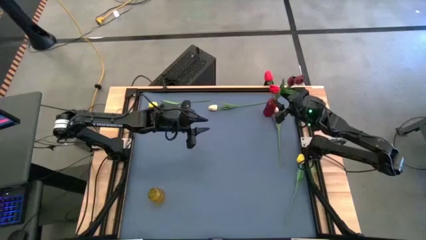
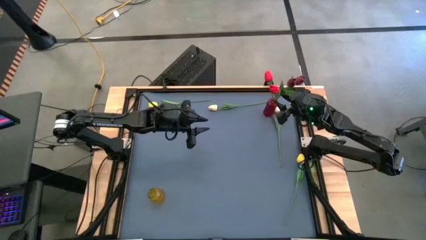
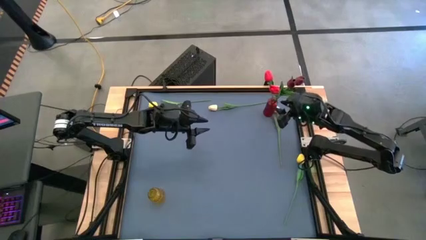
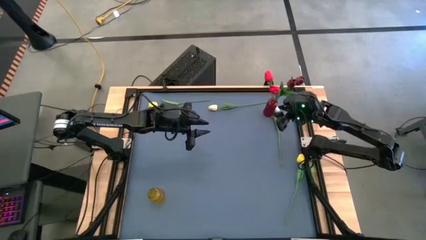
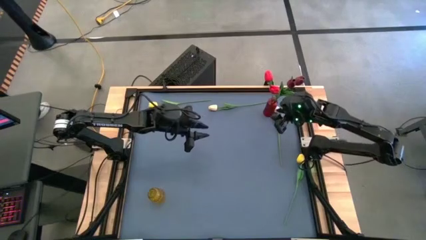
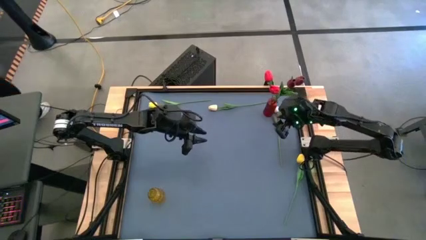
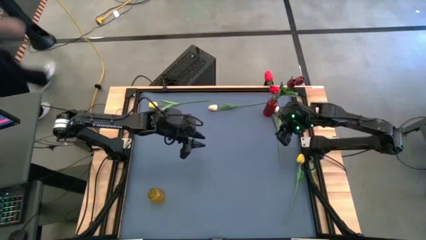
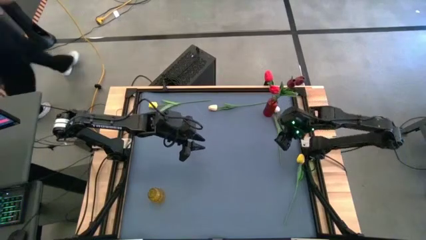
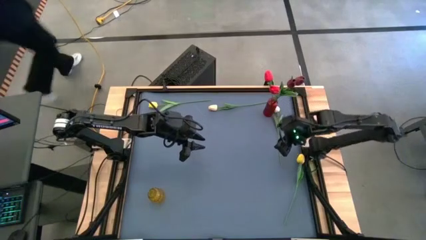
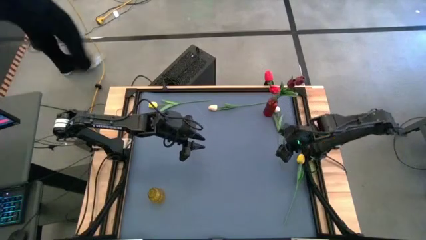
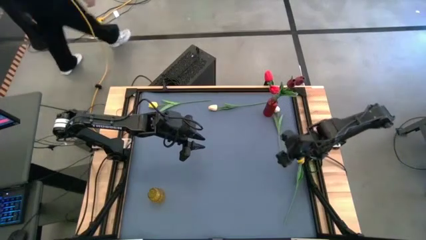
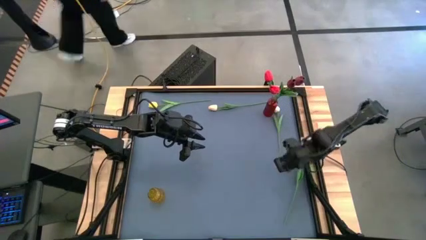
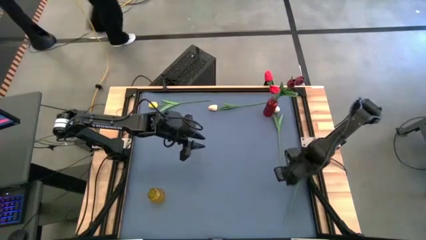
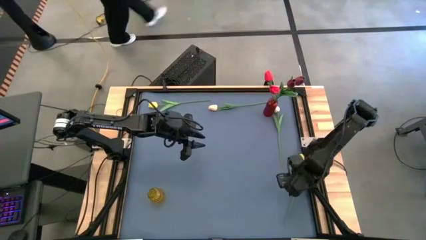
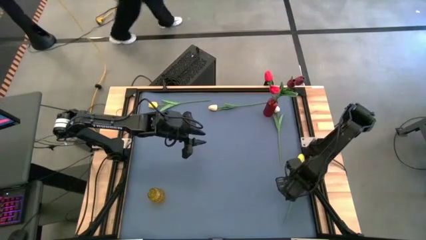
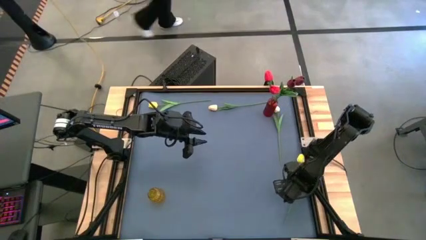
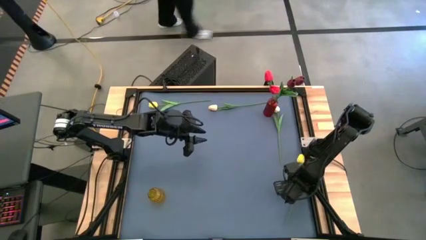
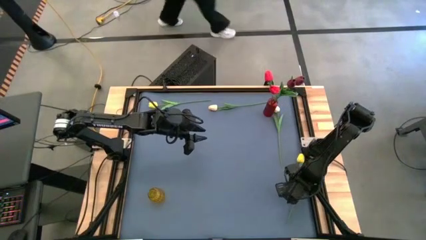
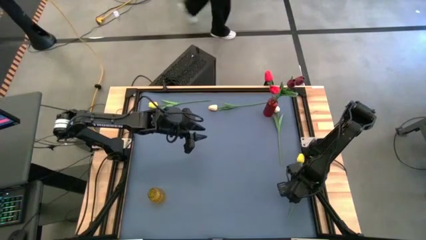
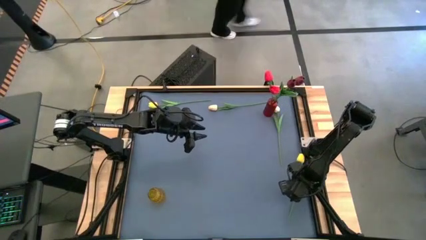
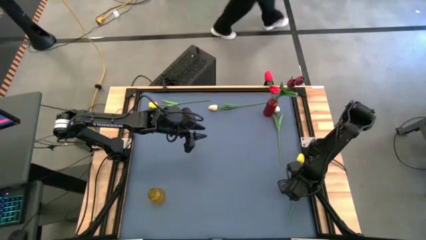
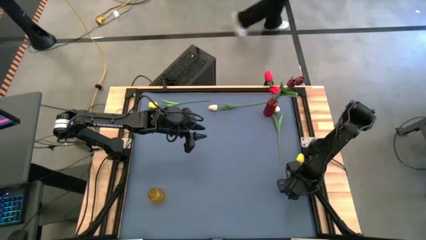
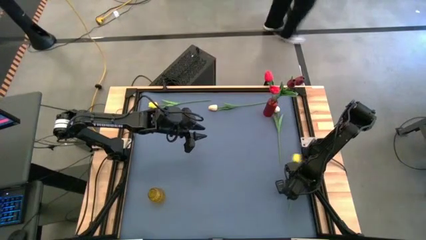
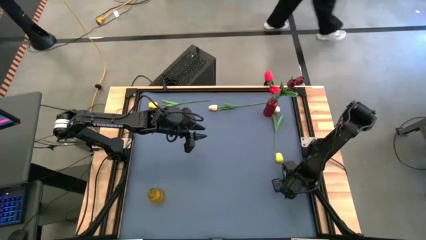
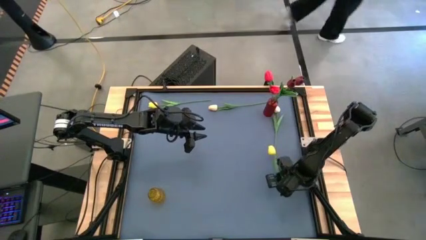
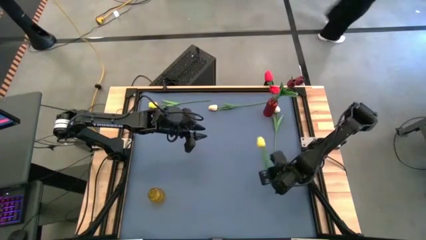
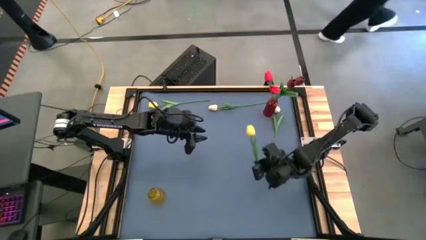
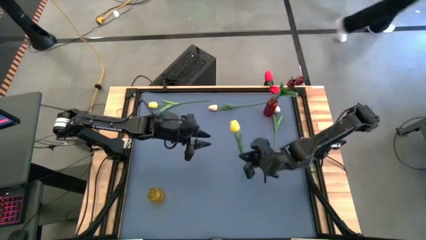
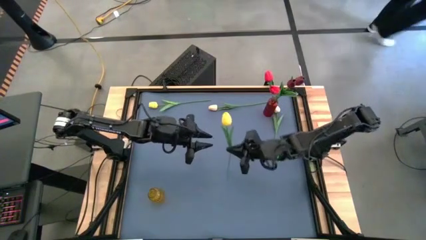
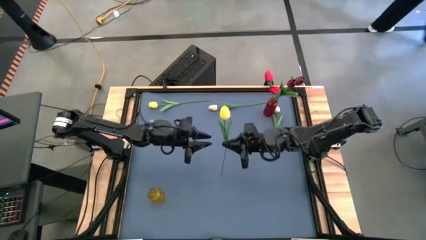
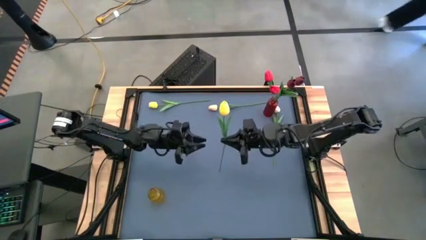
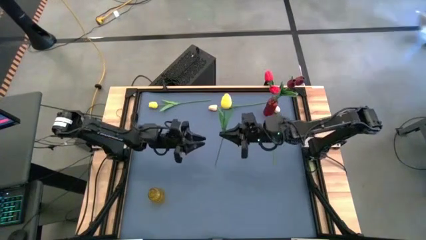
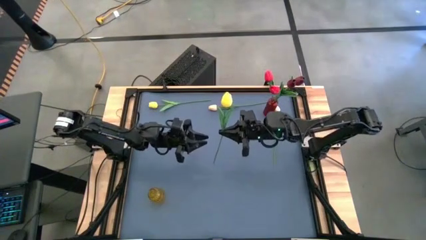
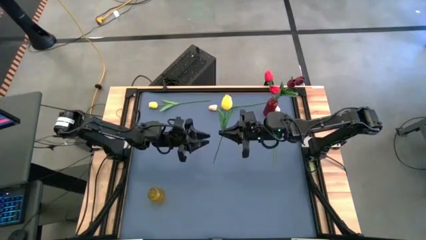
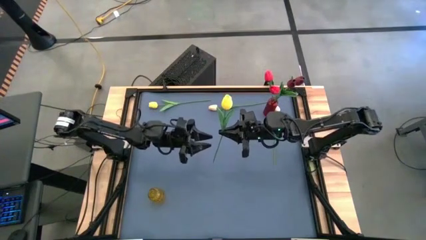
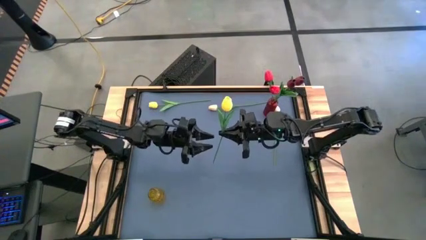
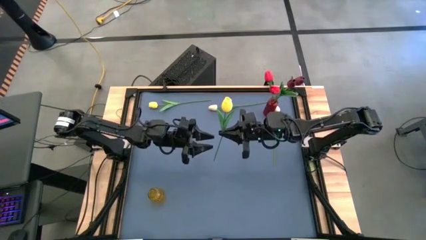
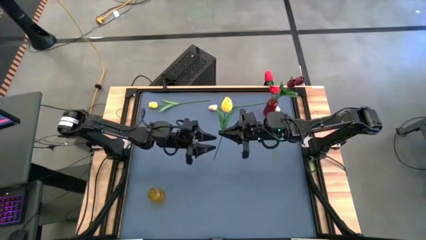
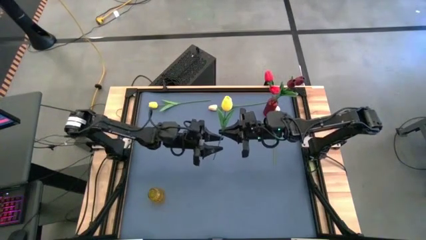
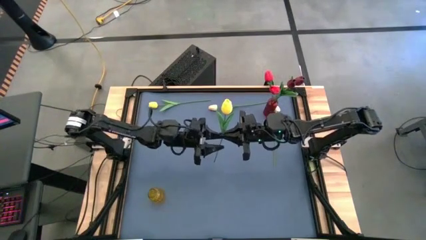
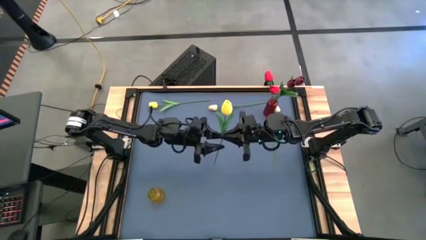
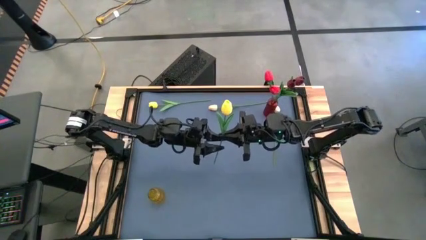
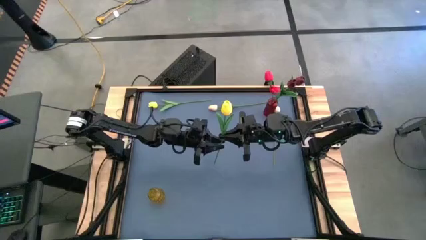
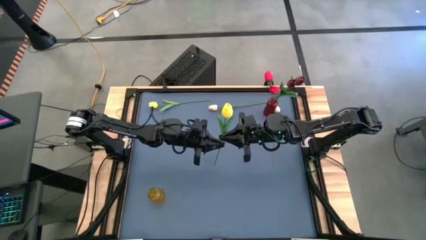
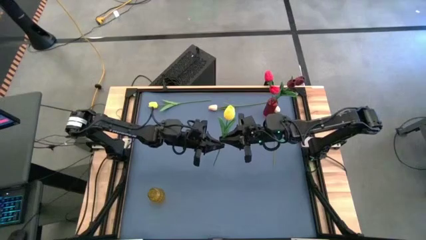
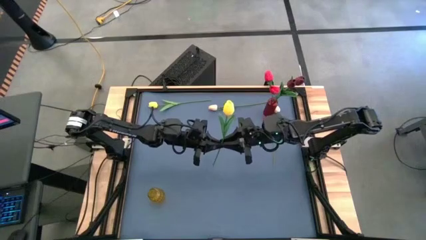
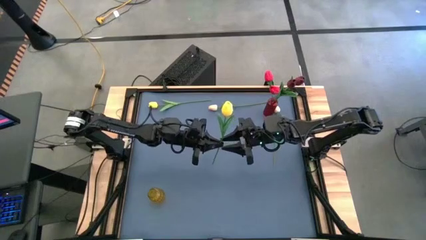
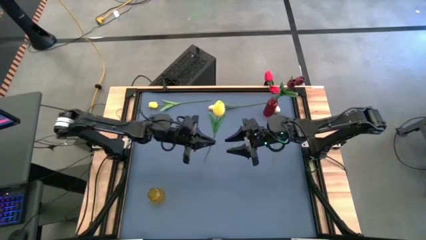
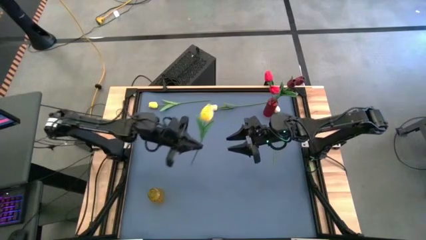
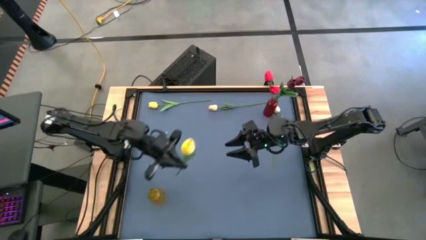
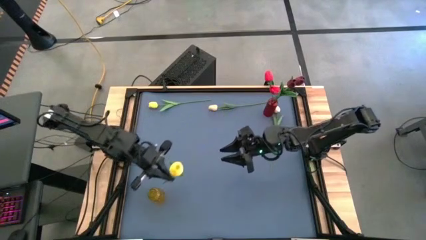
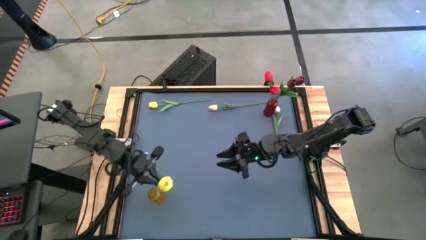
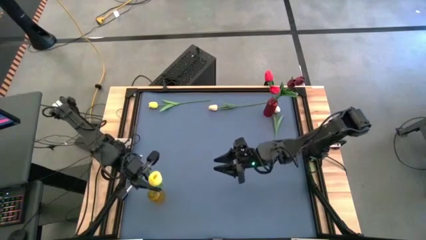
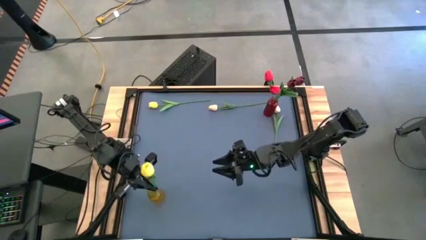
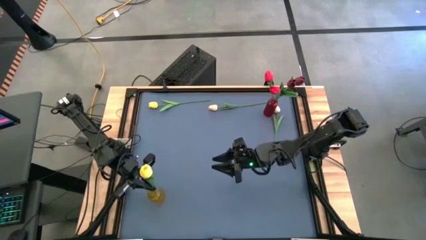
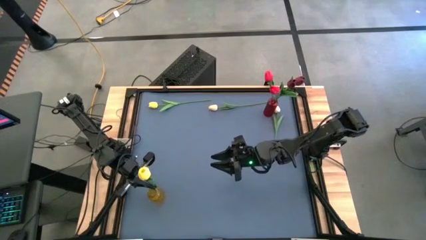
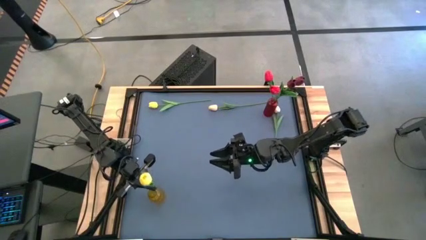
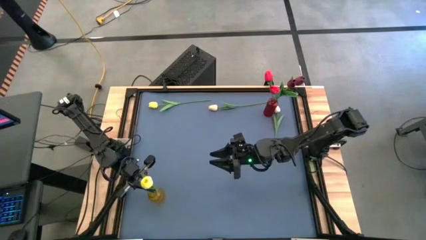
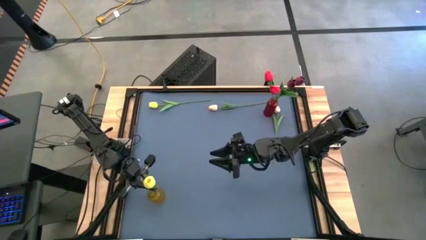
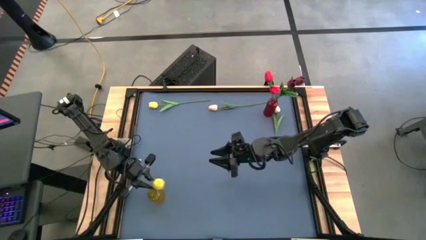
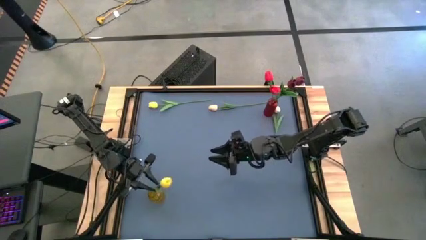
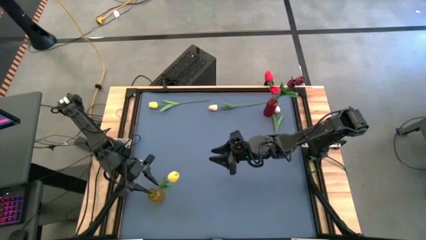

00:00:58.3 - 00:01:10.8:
Task: Sort flowers into vase by color
Put the bottom yellow flower into the yellow vase
